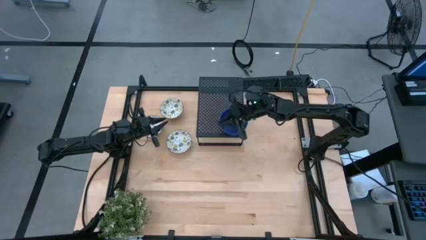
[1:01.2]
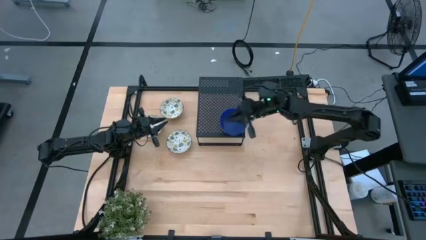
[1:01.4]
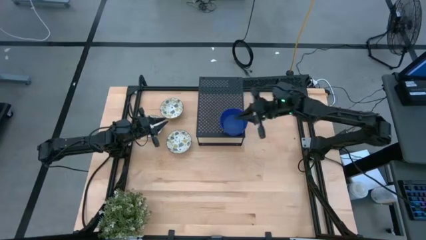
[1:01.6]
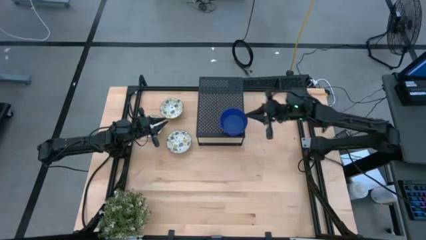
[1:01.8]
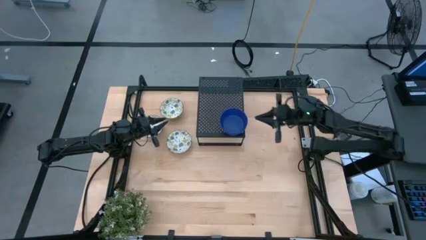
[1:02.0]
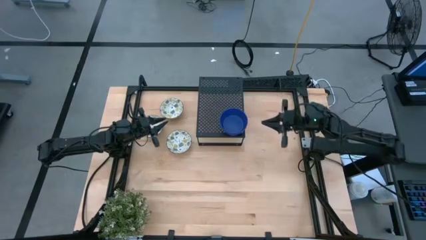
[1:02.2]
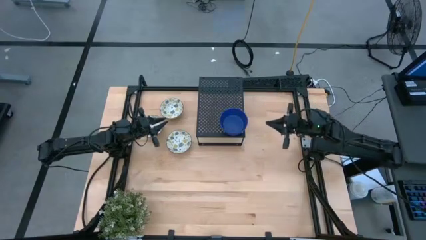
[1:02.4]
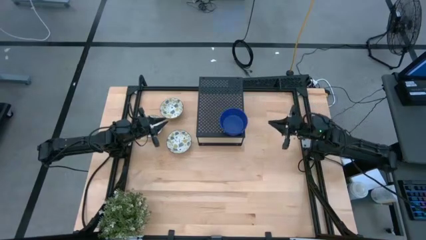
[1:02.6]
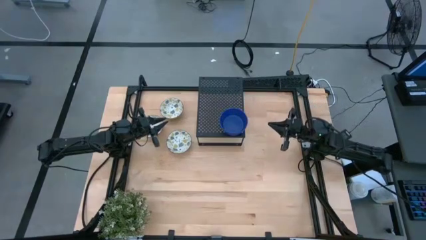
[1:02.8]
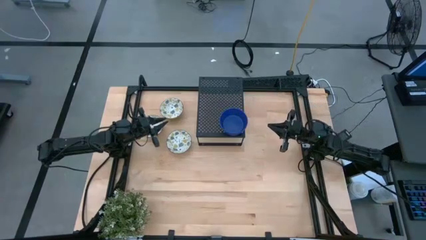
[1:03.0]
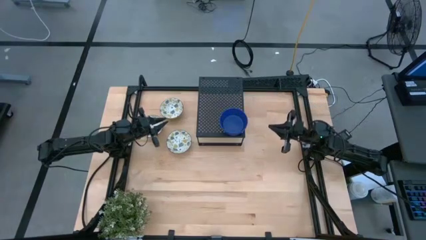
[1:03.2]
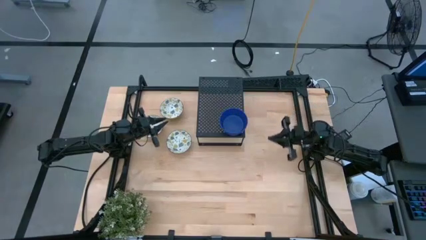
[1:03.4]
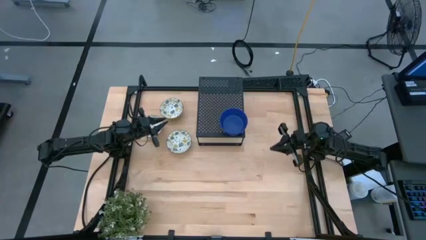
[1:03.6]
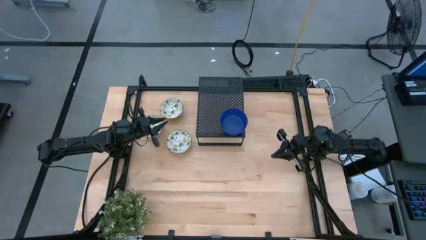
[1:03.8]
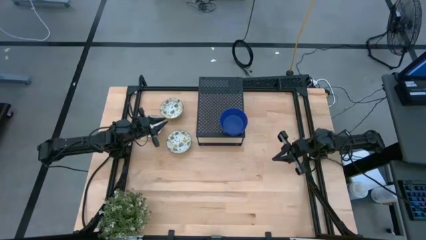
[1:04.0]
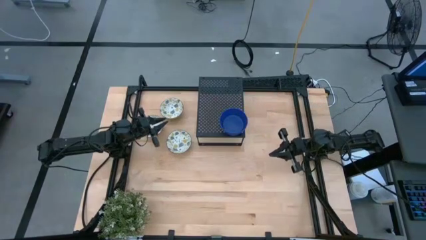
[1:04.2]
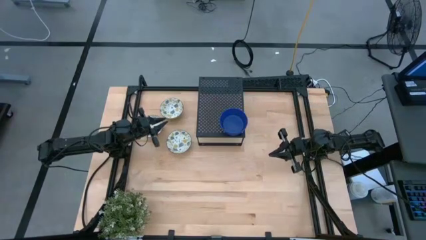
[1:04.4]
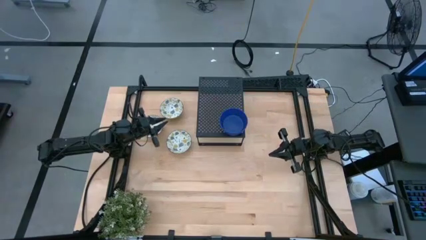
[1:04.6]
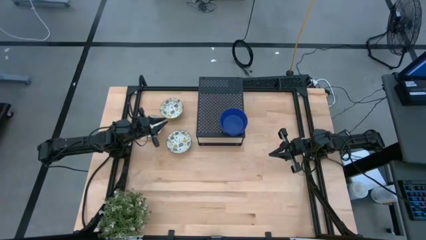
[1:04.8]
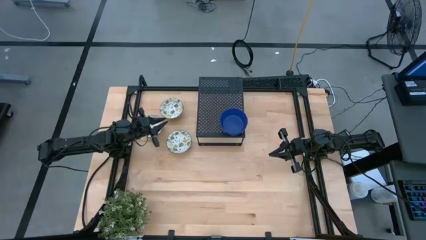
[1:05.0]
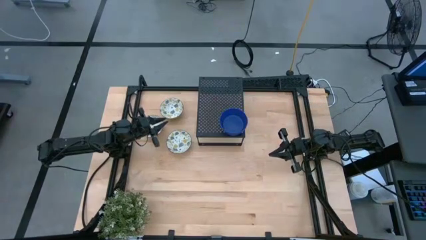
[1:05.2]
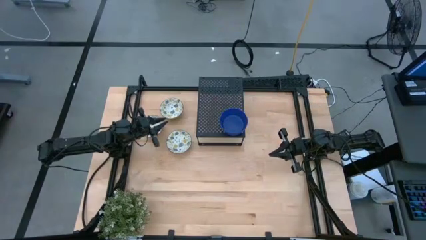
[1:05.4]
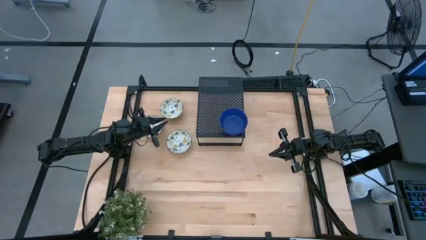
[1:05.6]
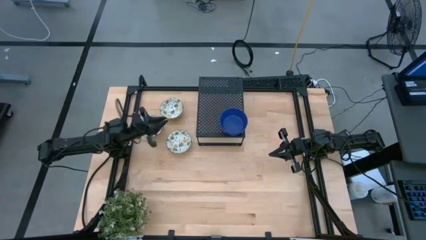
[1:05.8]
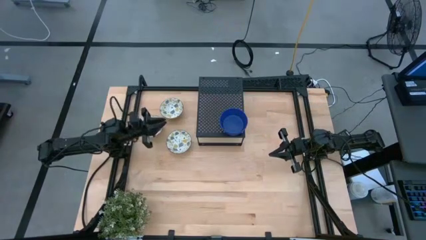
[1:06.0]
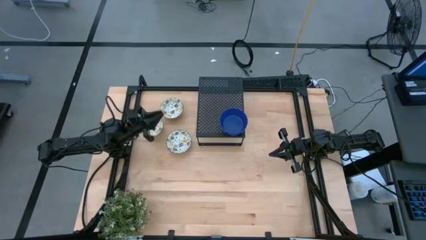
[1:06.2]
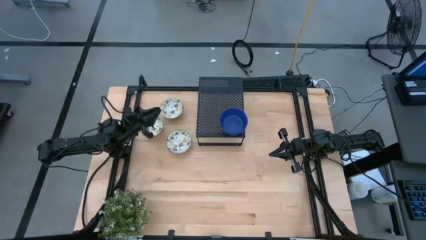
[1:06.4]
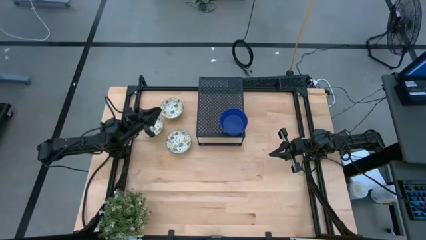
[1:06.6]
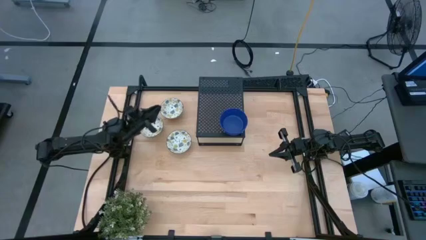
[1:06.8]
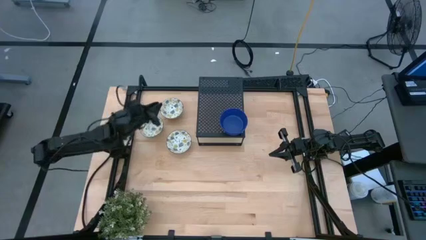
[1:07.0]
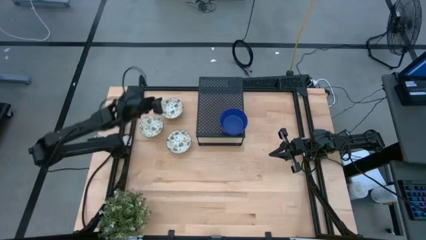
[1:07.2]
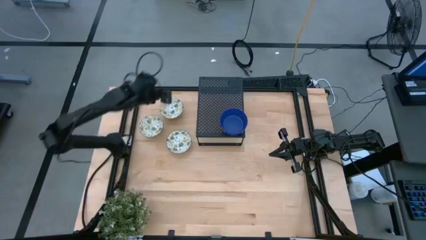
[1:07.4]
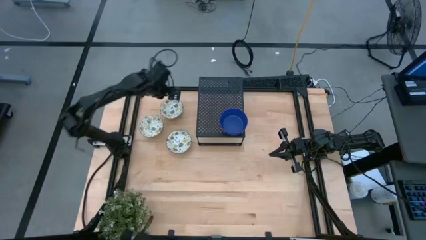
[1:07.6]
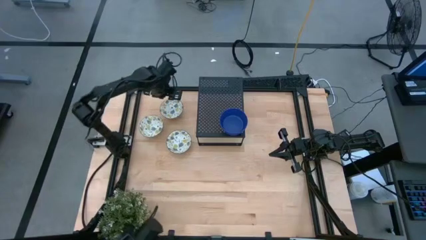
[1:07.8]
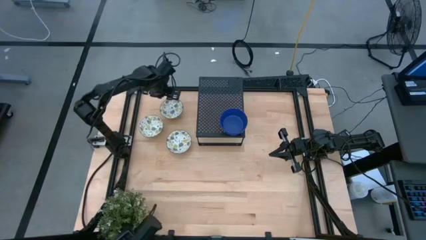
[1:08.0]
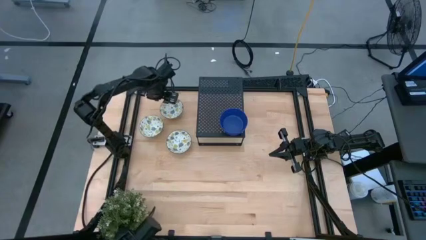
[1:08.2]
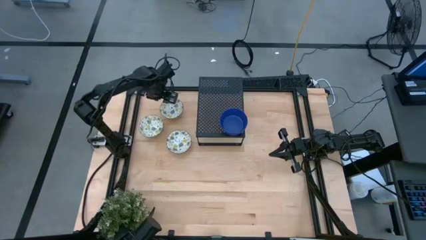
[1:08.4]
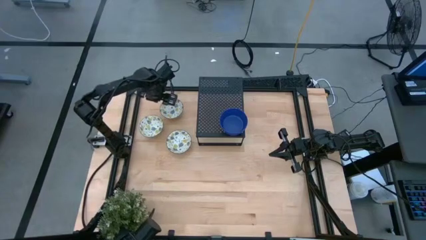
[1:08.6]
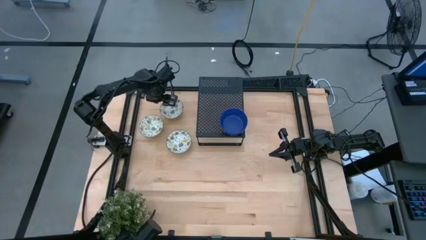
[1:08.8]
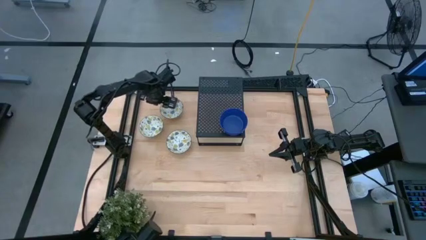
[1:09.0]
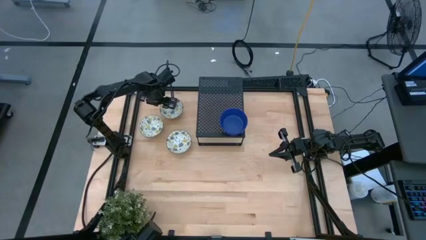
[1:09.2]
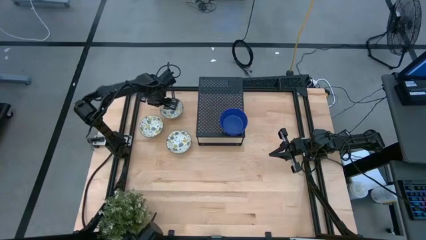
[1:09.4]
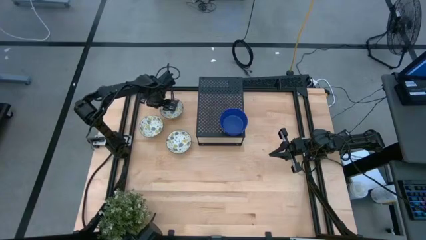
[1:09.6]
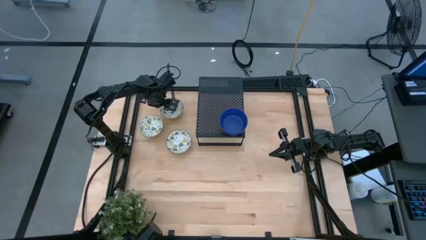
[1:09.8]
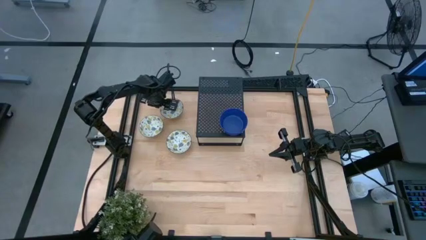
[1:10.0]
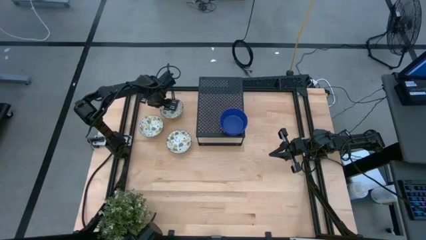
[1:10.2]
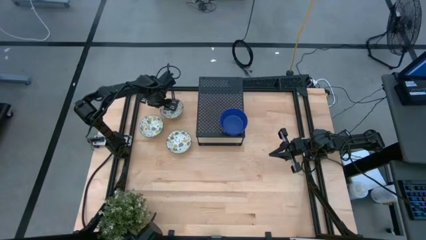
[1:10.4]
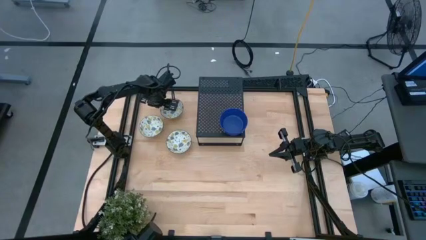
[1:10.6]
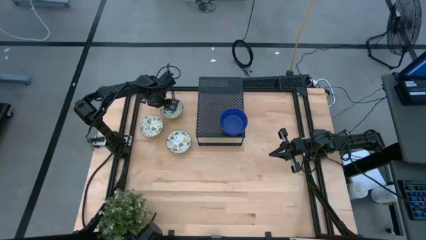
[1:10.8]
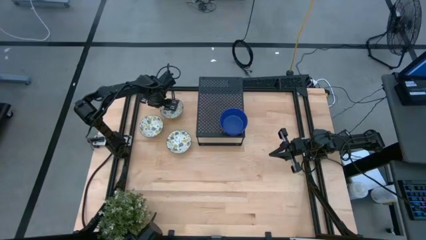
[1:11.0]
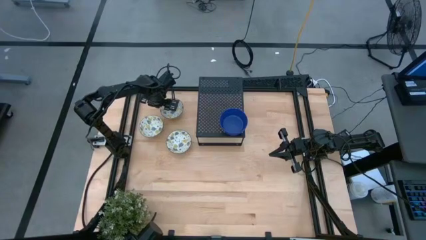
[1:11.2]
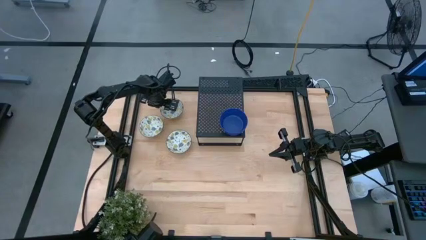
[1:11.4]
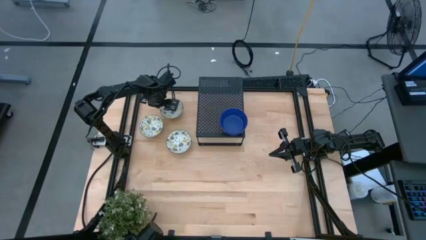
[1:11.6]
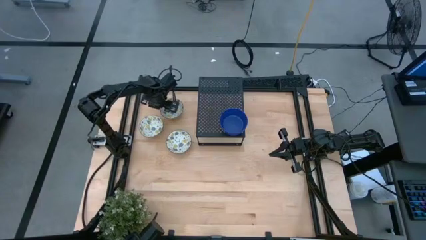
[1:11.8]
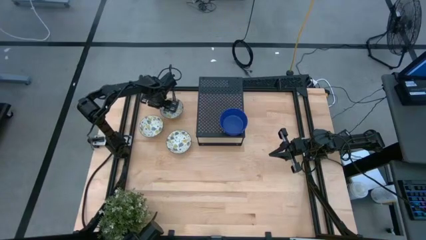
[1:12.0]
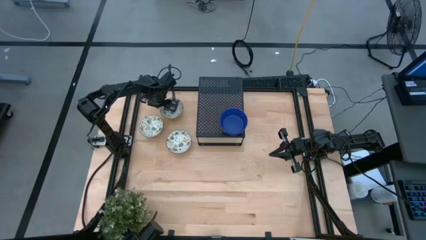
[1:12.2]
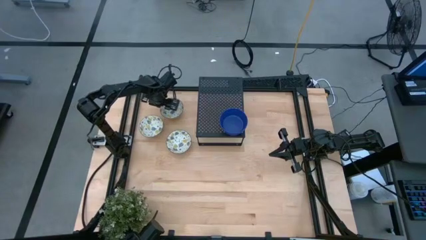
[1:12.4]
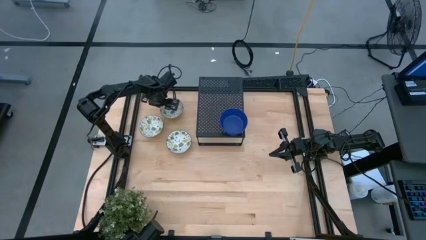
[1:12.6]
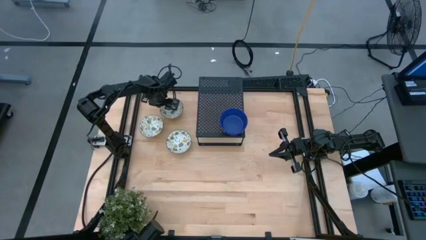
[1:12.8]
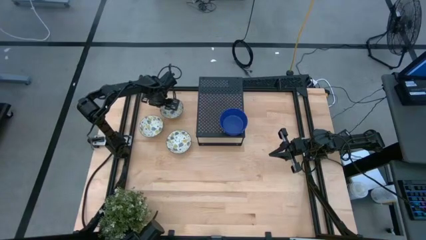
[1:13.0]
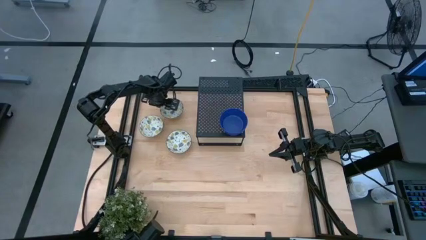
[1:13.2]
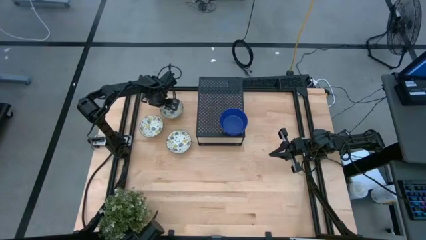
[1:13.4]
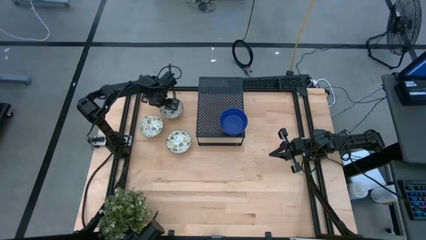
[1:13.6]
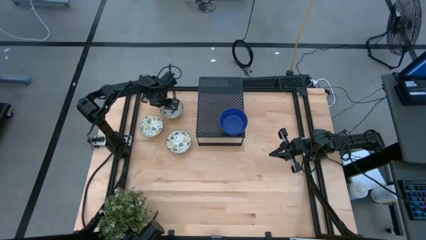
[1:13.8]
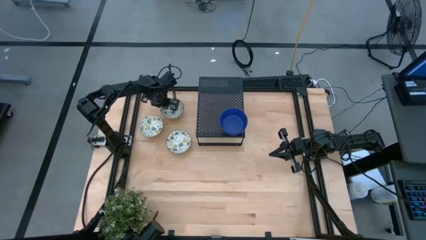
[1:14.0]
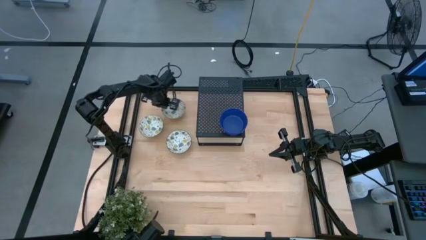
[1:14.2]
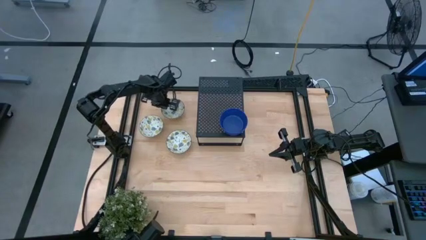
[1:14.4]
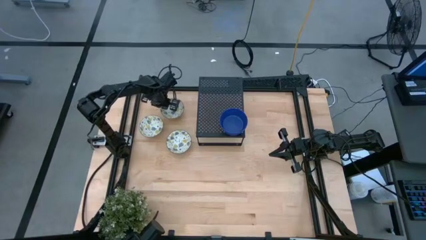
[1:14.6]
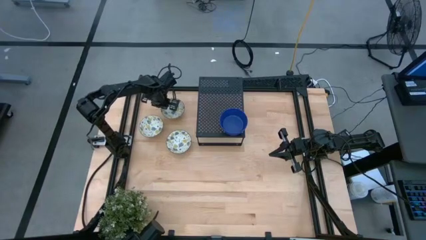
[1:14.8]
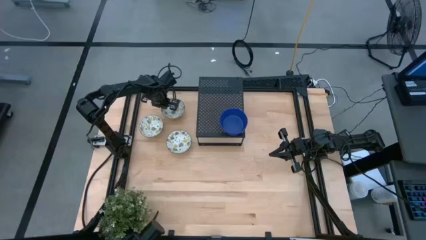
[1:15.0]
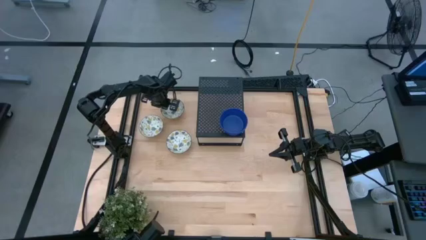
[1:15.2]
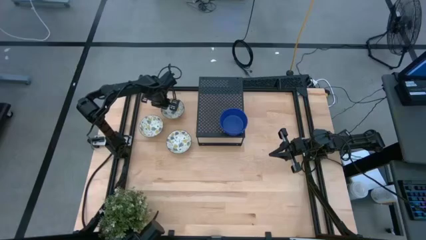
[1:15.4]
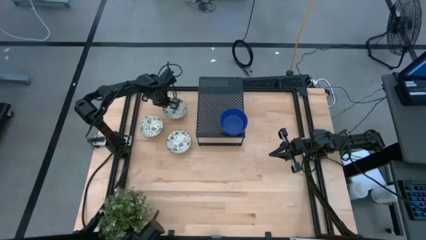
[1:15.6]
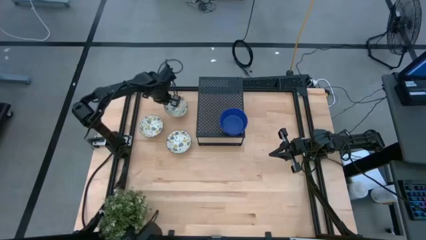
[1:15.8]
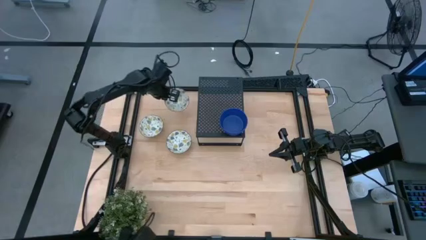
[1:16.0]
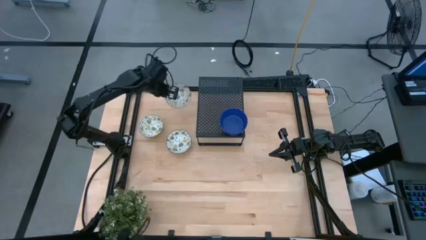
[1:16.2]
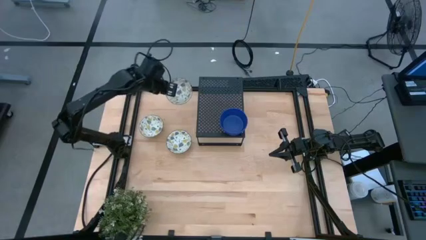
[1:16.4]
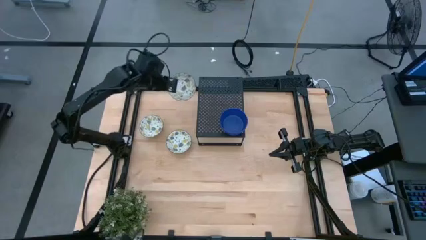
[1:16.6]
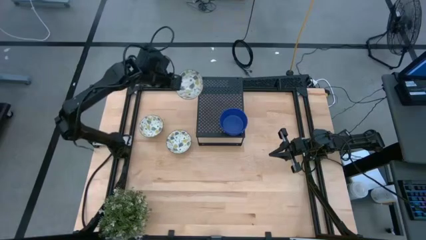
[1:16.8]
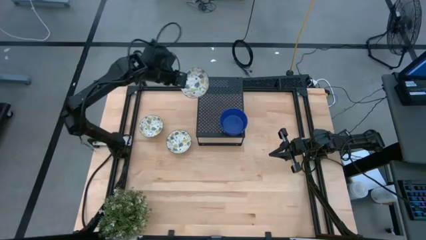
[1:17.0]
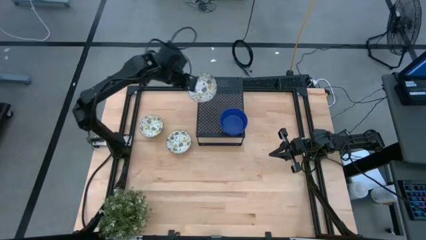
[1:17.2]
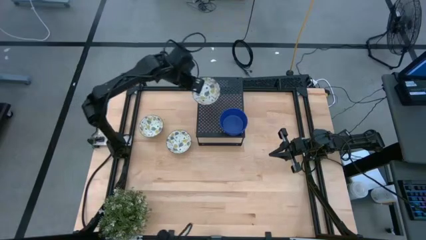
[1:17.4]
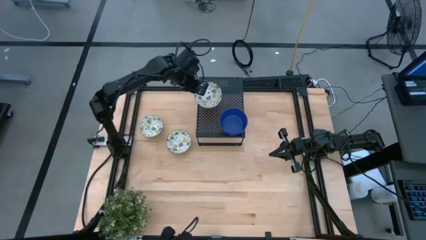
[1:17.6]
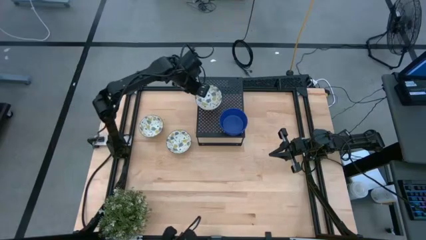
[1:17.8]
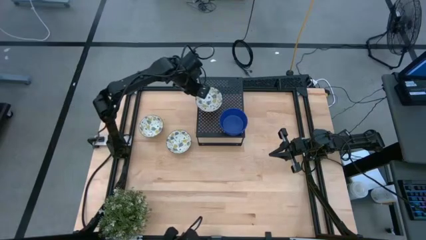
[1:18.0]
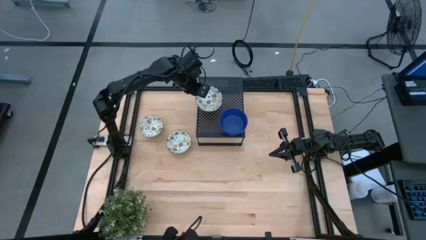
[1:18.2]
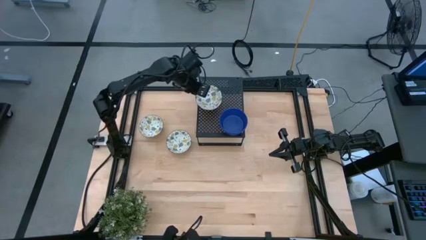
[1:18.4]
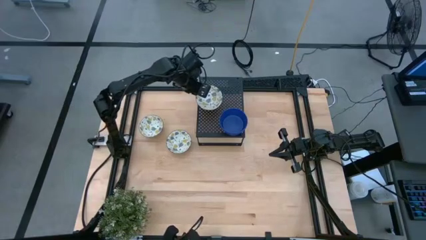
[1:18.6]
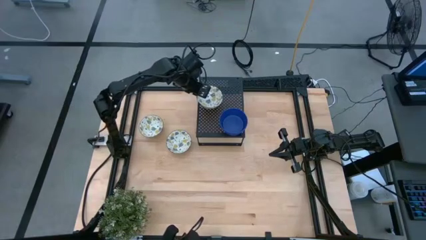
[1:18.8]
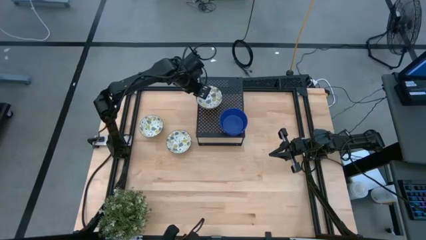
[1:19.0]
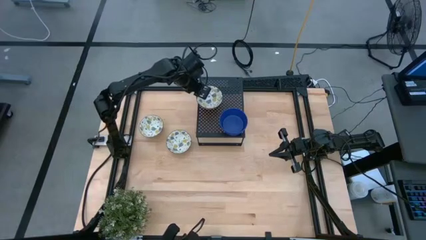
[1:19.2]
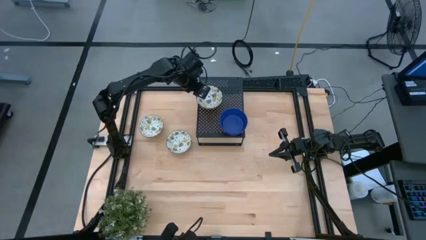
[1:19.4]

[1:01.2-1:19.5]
Task: Pick & Place Mini bowls
Put the top white bowl on the shelf
